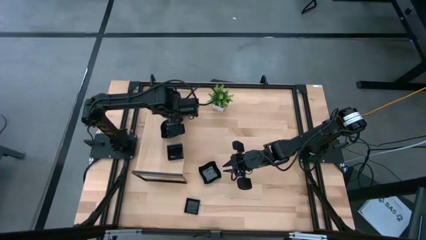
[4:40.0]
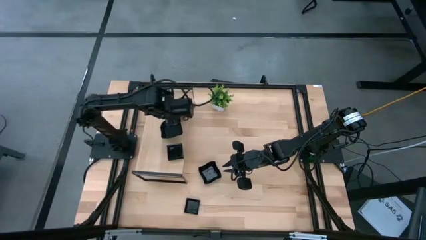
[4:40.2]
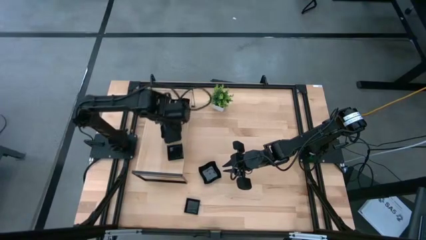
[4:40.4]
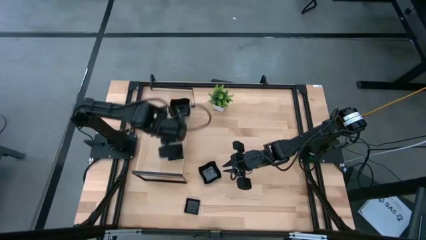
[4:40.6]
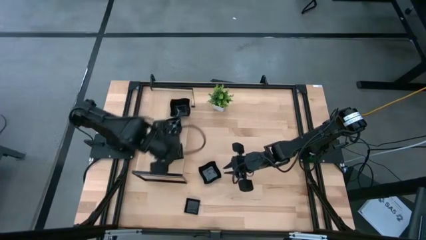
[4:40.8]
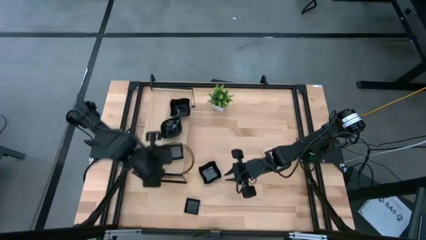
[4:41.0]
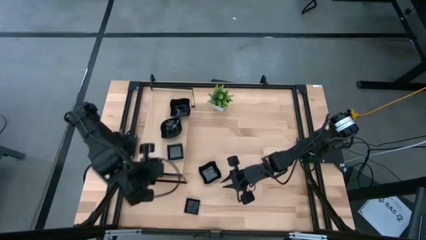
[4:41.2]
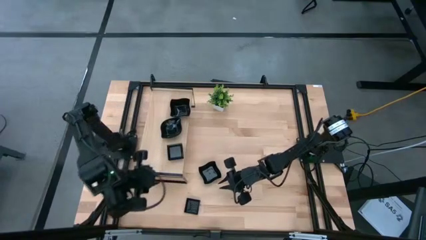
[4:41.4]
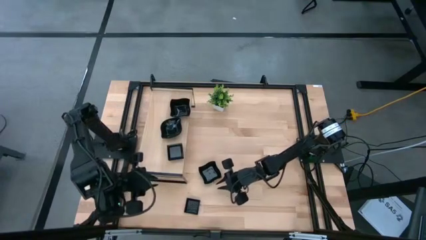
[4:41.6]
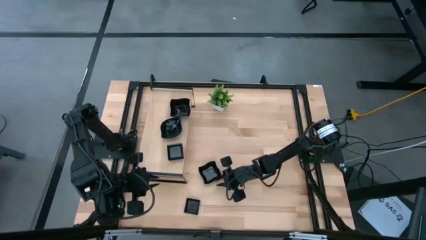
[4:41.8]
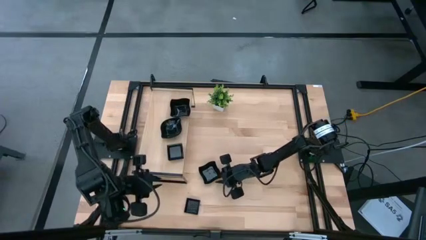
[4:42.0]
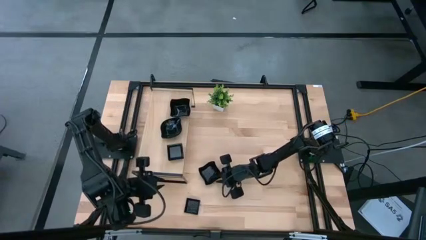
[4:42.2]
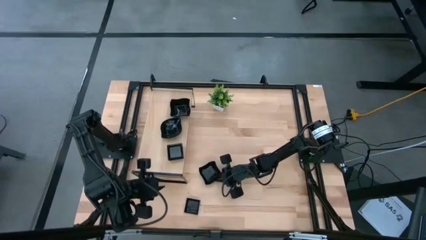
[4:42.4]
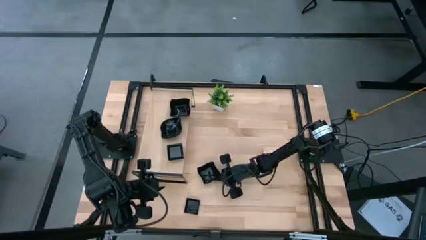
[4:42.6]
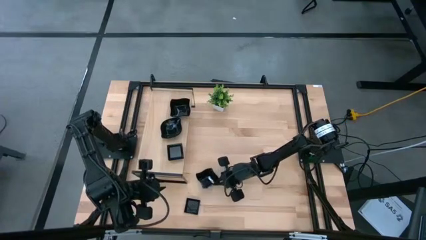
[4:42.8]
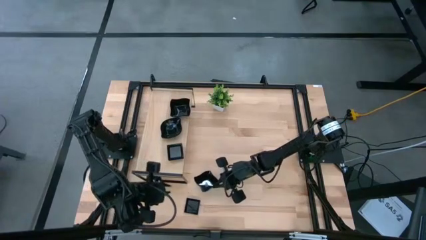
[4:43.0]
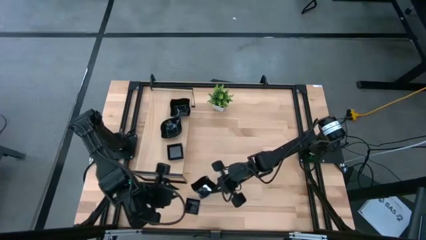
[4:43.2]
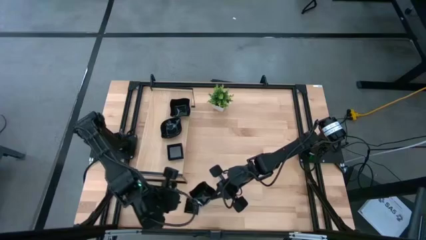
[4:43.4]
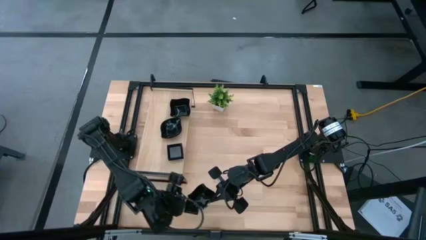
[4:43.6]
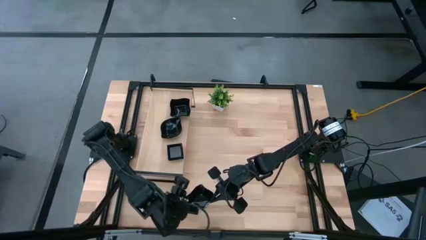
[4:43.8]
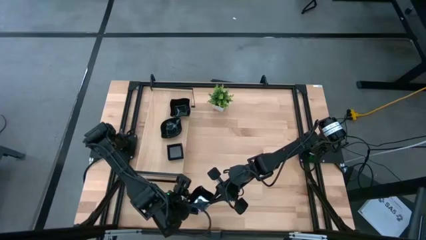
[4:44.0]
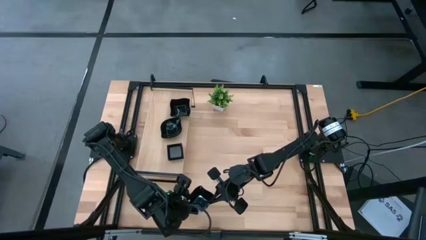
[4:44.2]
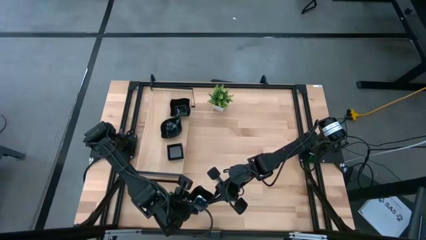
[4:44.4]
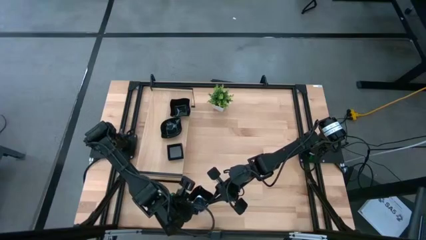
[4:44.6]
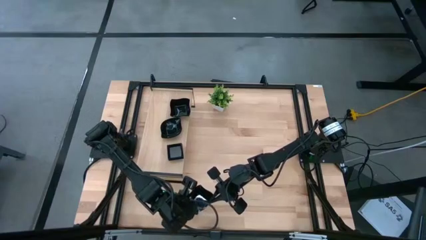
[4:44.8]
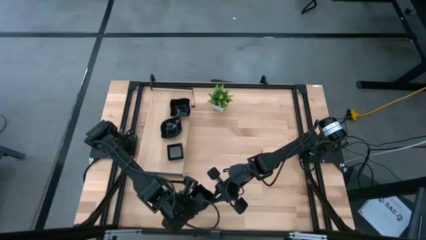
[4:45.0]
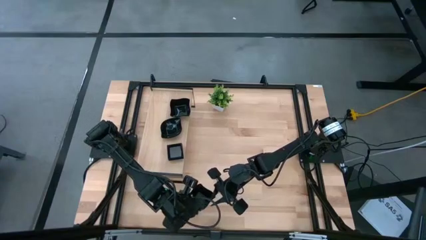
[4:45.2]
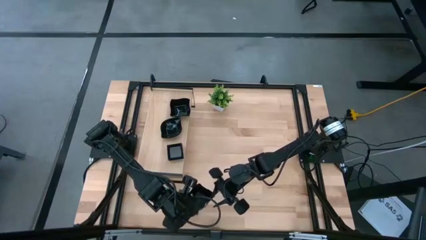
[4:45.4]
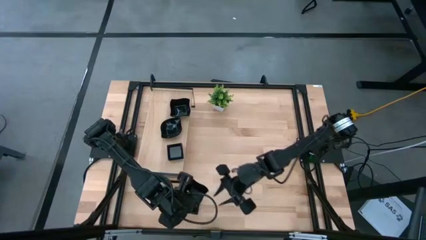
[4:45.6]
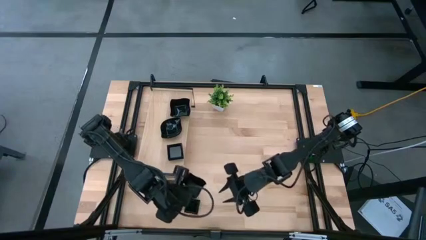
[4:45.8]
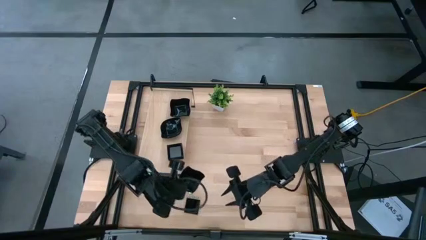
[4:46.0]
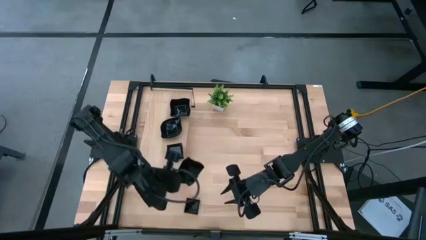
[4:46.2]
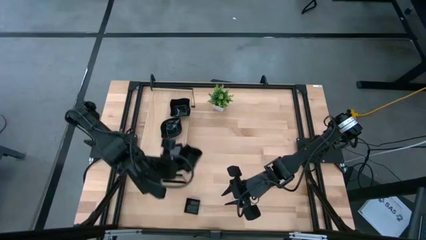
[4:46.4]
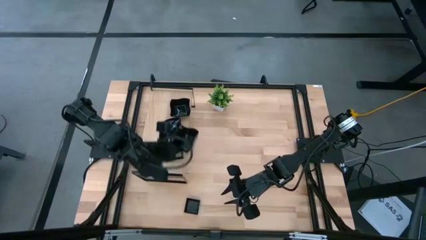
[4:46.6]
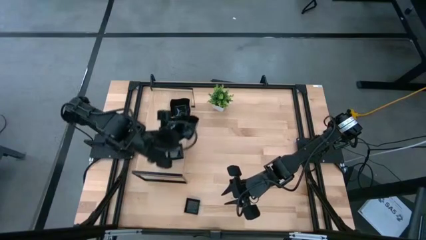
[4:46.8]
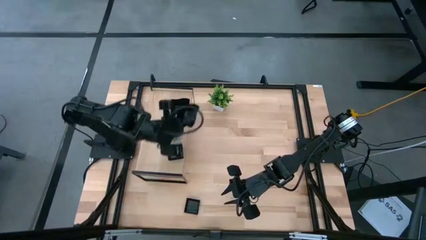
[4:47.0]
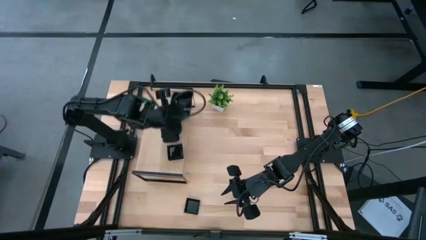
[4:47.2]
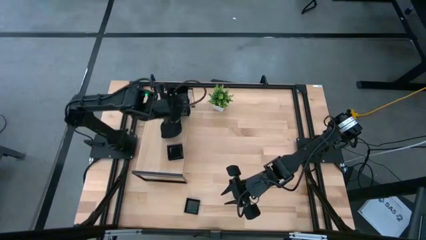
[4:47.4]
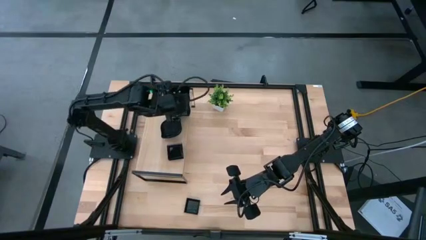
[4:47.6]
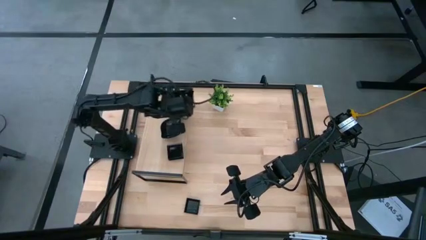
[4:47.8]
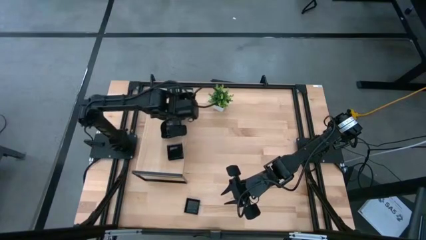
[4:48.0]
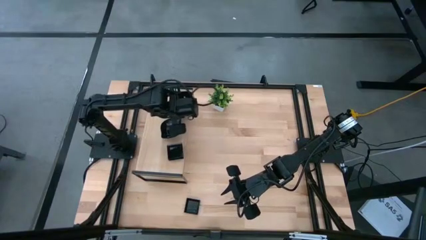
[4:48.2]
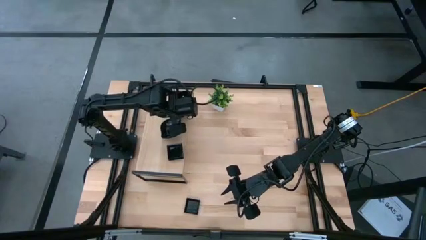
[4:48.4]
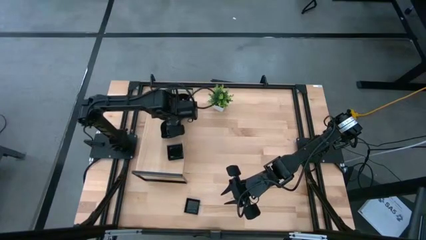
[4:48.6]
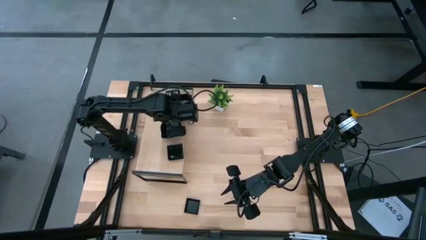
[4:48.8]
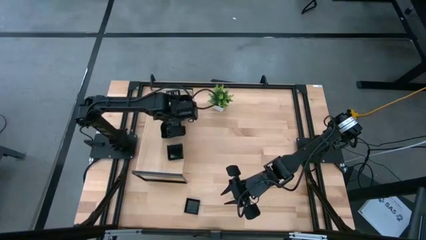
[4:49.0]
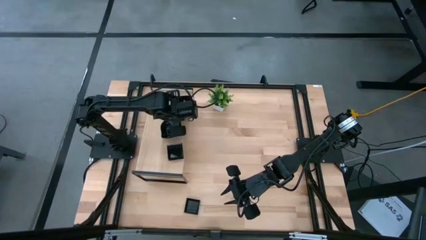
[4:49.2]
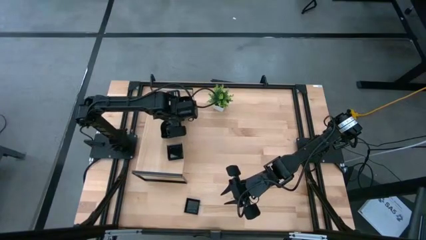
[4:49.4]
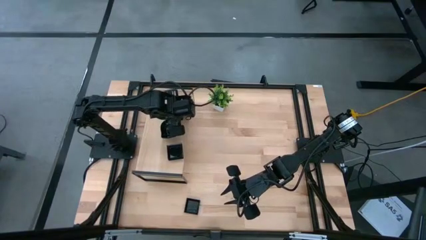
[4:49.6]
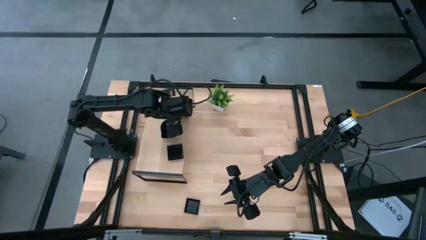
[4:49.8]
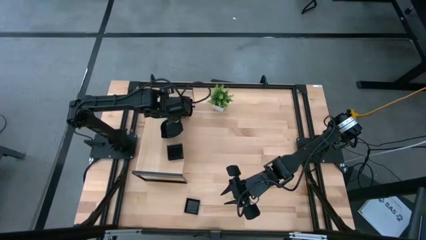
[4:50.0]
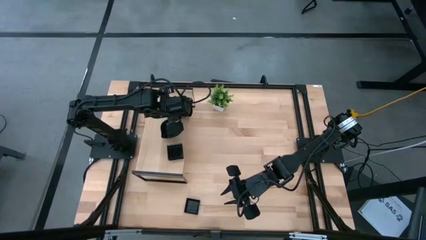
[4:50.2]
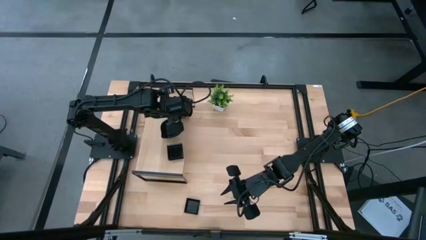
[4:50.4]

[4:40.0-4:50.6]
Task: Pick & Place Mini shaped plates
Stack the black distorted square plate on top of the black distorted square plate on the shelf

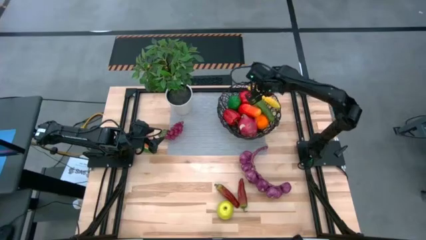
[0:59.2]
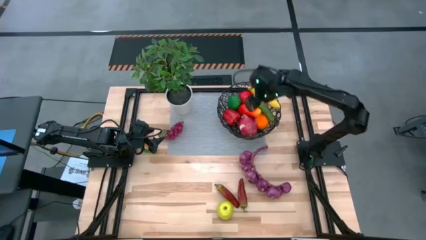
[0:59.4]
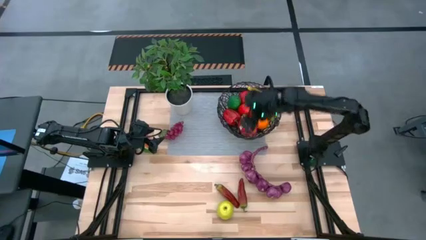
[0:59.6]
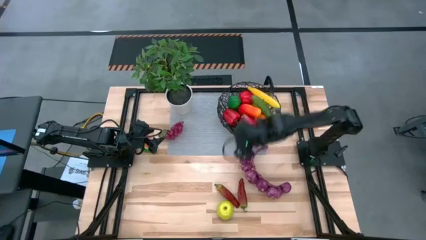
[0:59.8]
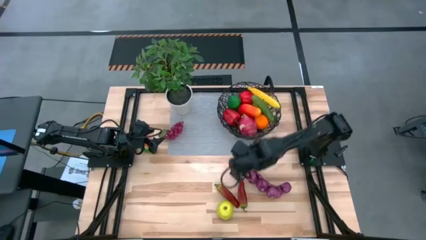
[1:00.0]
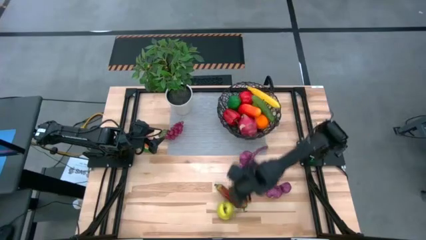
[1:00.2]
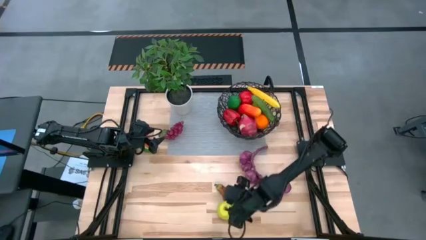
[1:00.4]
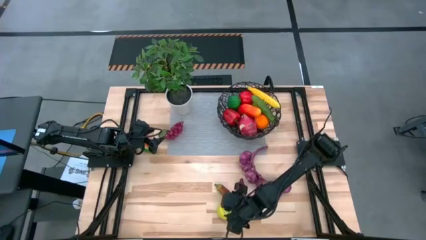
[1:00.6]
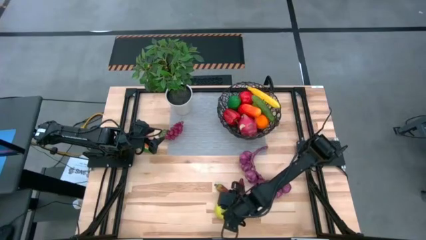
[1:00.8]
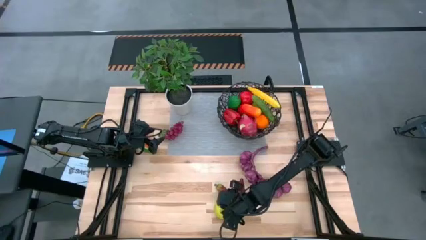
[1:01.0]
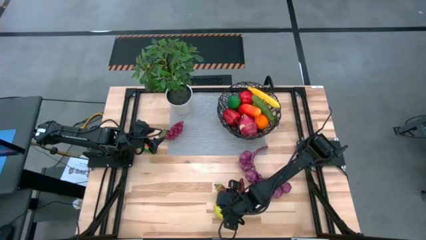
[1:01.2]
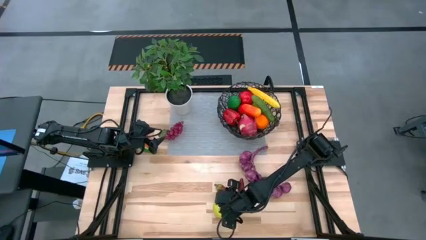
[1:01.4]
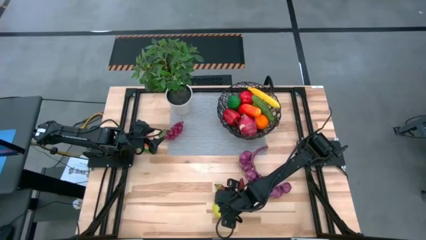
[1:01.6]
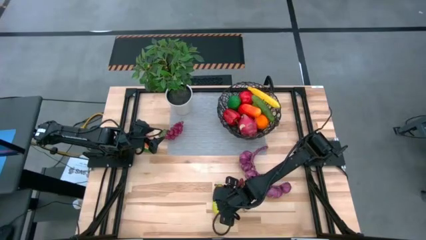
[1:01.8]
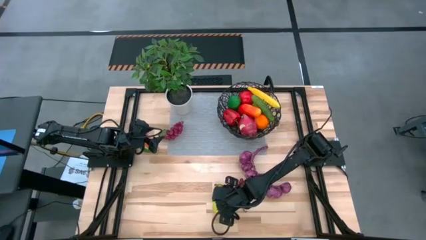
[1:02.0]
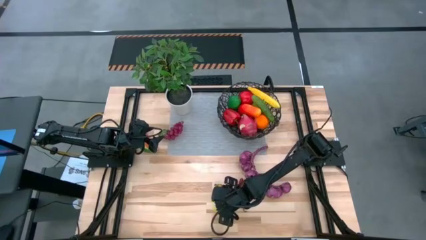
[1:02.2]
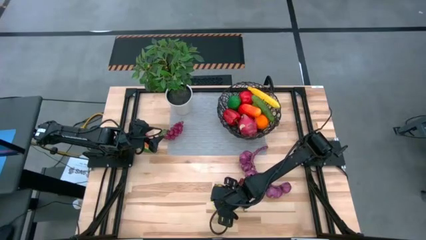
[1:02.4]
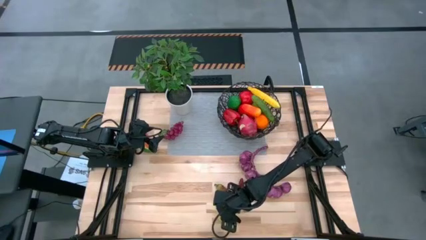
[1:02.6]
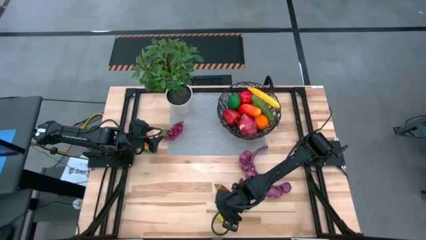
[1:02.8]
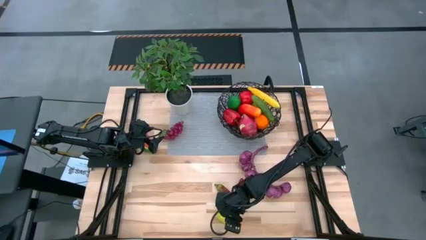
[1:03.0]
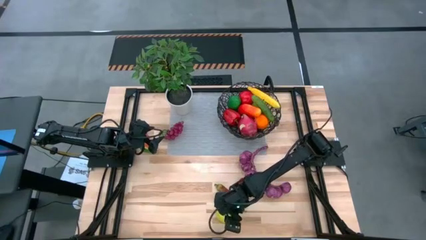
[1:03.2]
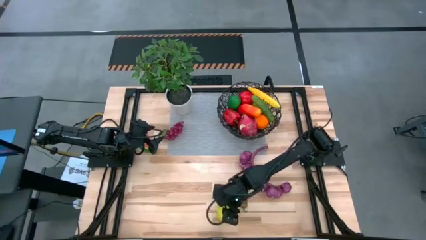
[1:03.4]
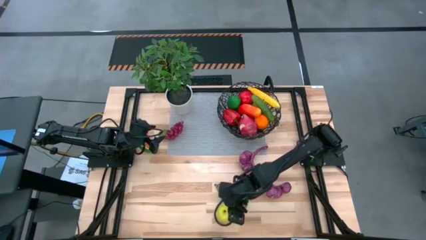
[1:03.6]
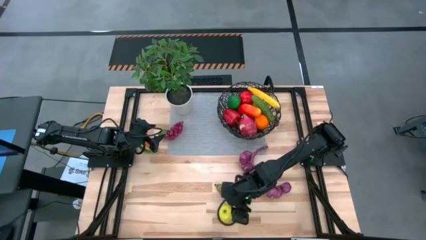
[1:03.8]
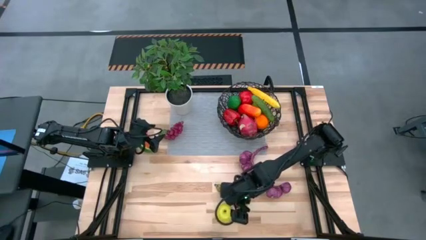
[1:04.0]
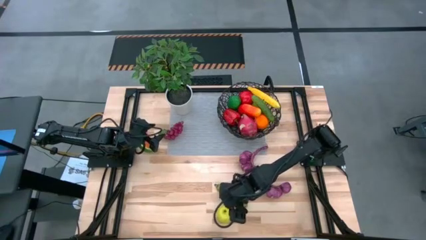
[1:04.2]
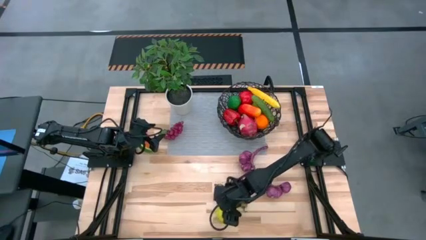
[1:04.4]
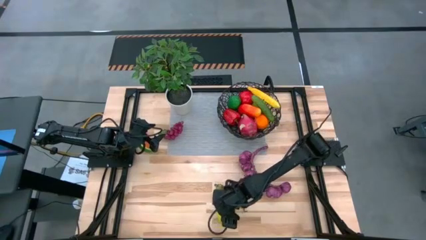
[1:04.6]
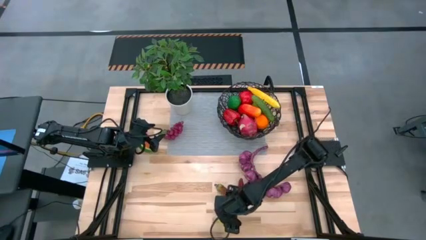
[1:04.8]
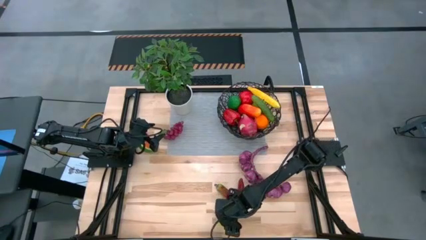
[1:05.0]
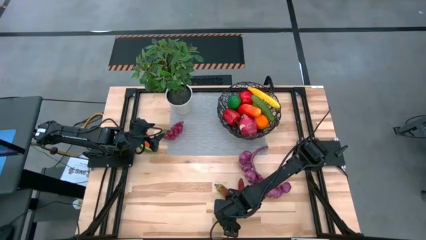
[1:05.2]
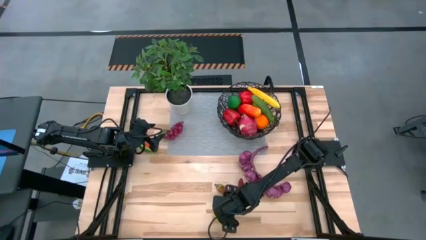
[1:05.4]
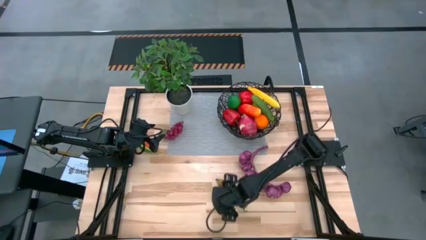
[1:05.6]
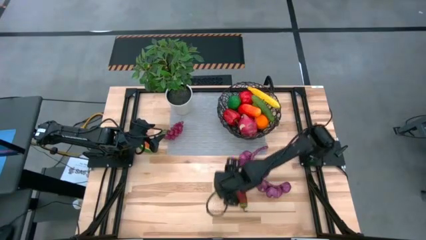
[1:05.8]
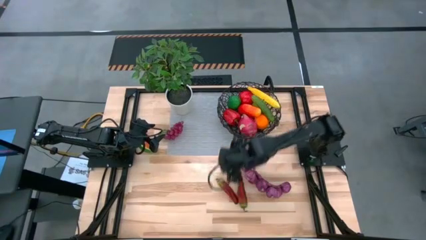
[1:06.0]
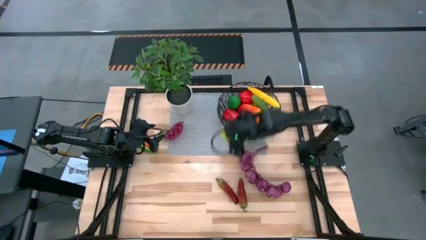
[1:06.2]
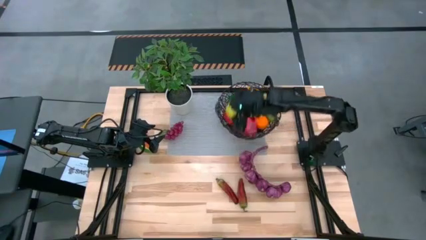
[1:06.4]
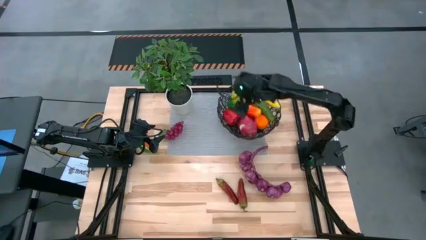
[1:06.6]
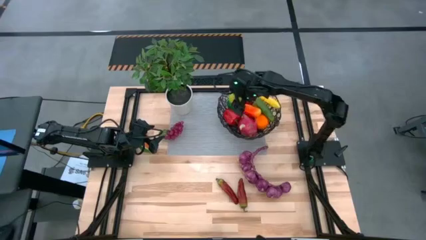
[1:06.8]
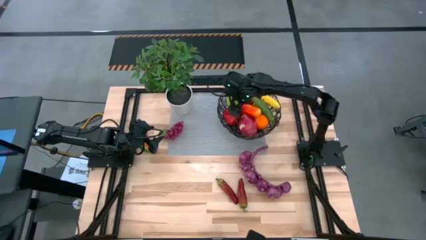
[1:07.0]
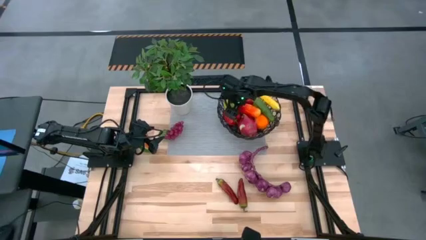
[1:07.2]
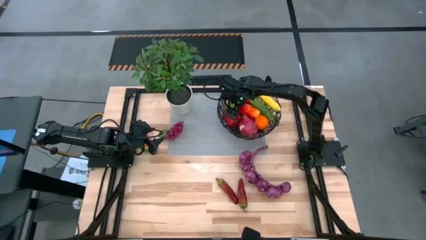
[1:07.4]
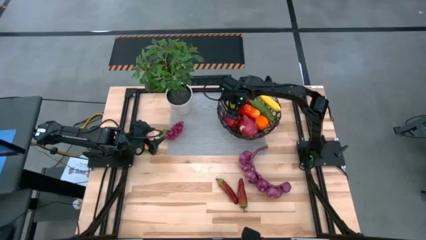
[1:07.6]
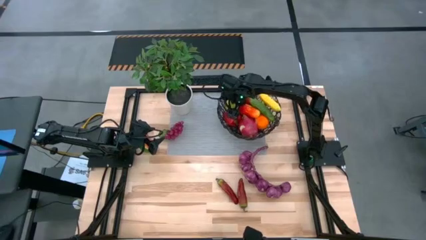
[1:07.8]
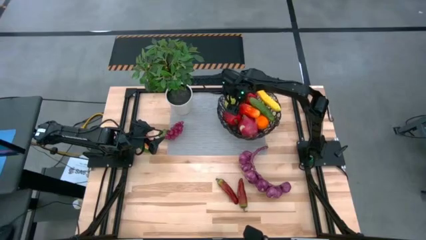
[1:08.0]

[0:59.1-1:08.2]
Task: Build produce basket
Put the green apple into the wire basket
